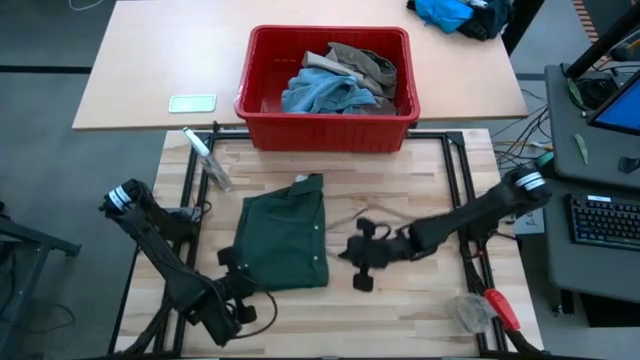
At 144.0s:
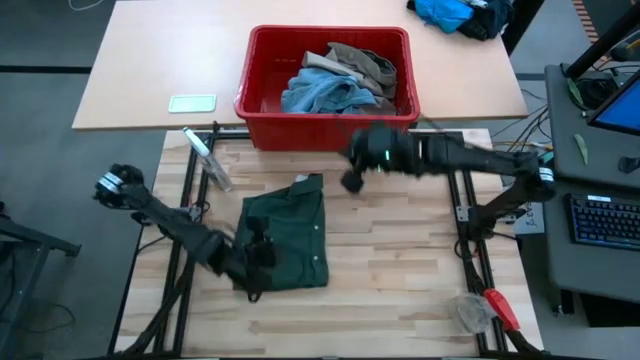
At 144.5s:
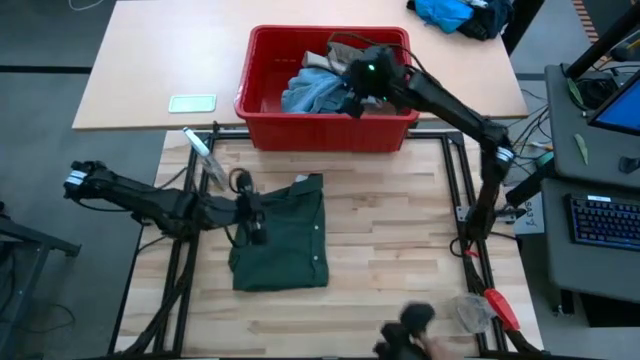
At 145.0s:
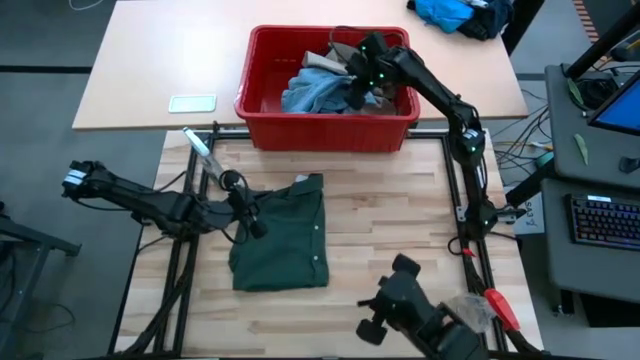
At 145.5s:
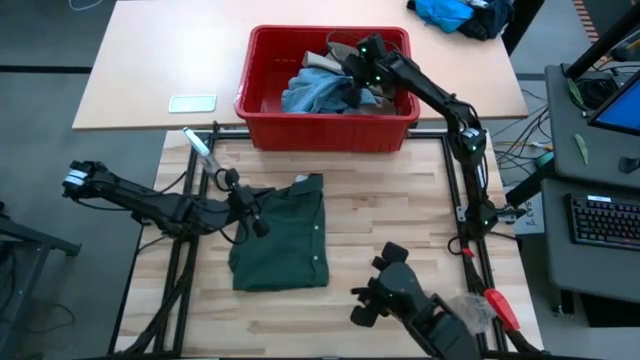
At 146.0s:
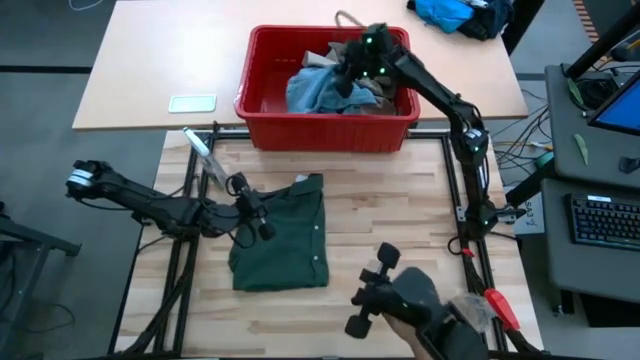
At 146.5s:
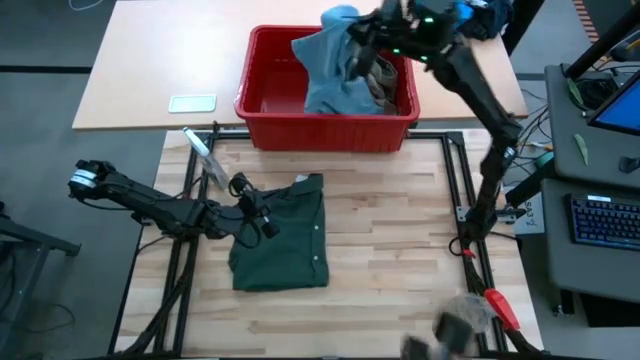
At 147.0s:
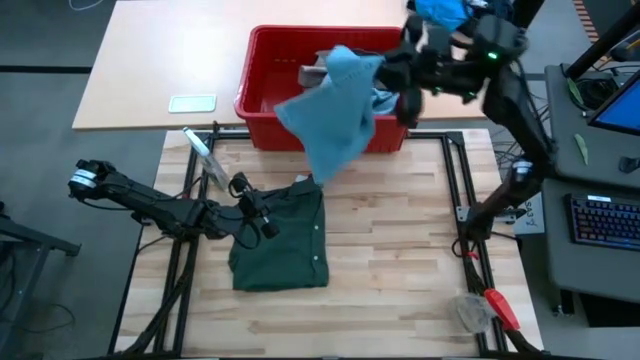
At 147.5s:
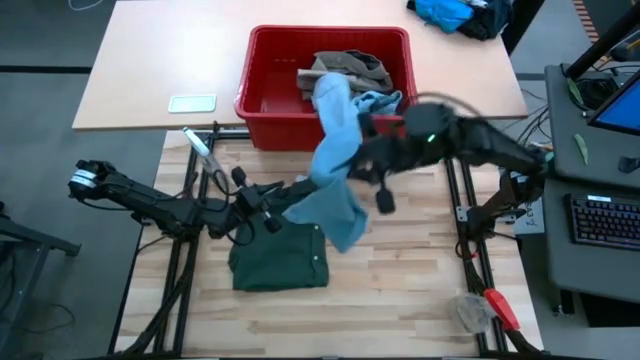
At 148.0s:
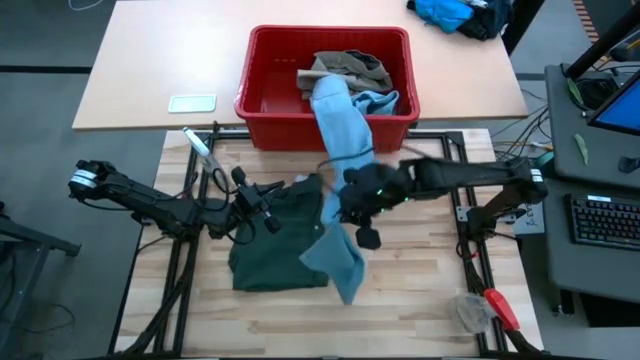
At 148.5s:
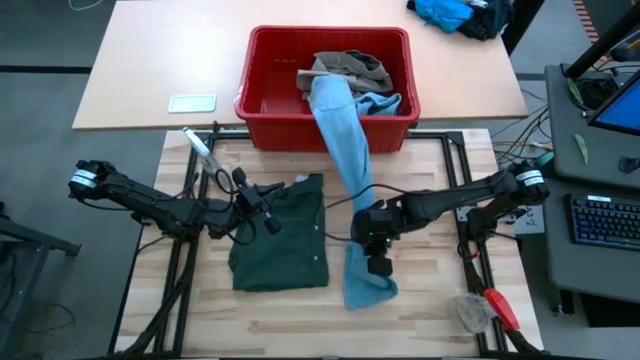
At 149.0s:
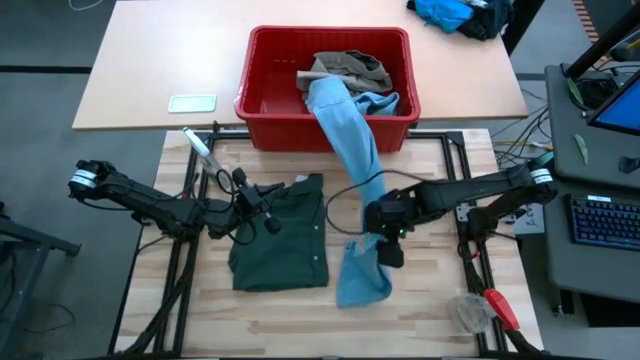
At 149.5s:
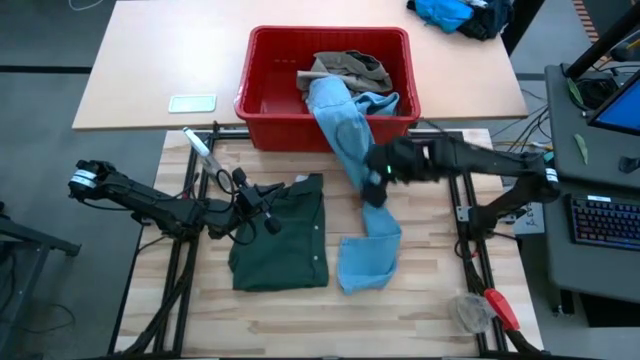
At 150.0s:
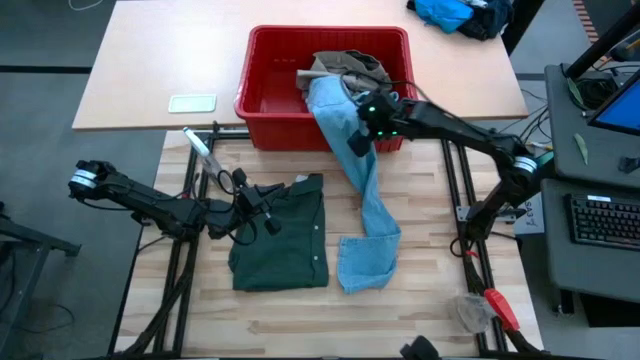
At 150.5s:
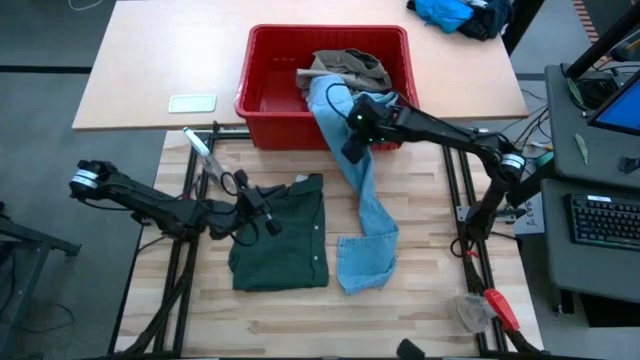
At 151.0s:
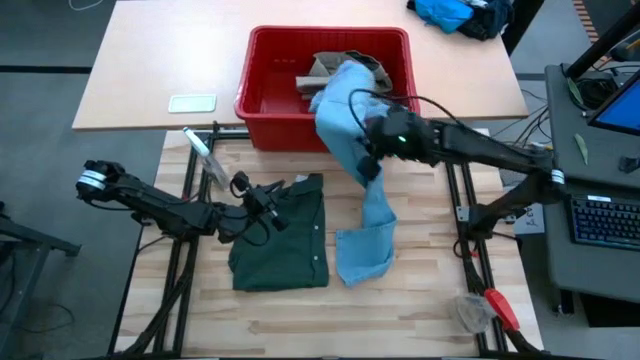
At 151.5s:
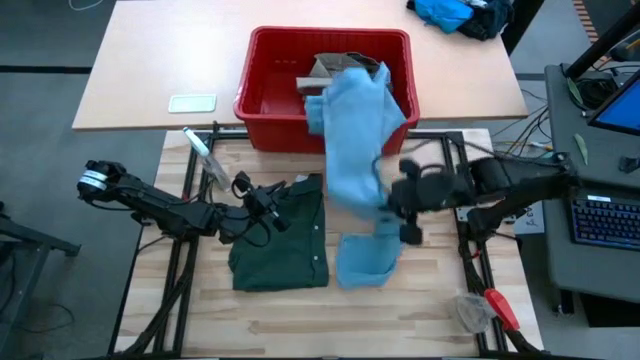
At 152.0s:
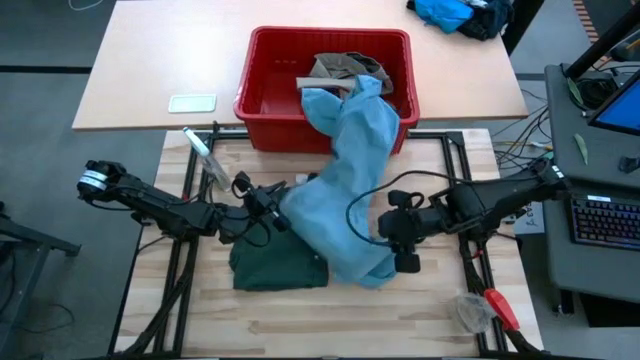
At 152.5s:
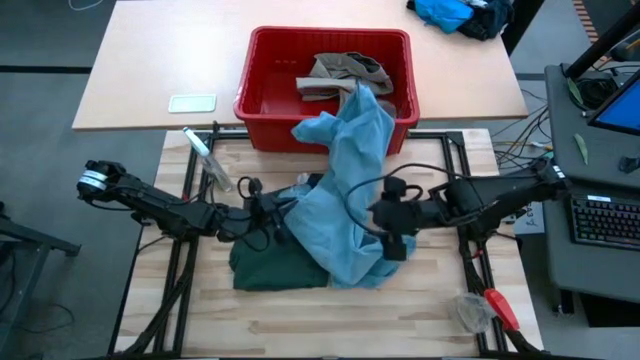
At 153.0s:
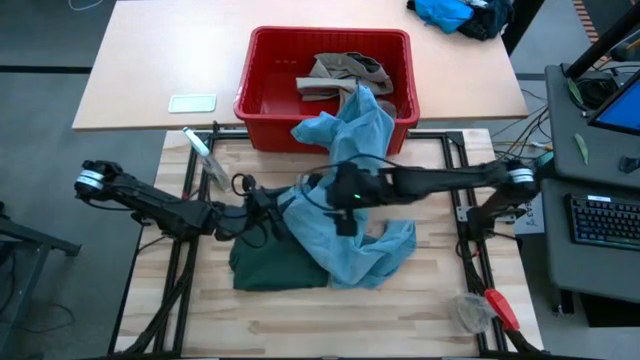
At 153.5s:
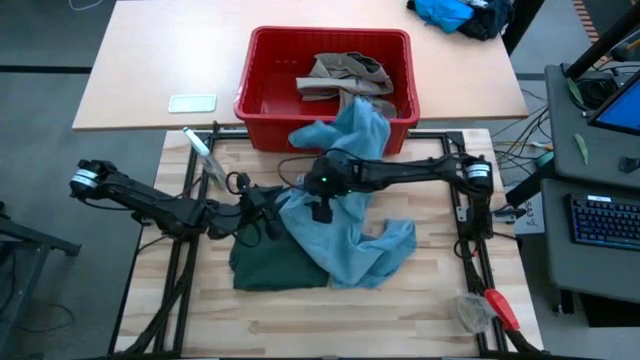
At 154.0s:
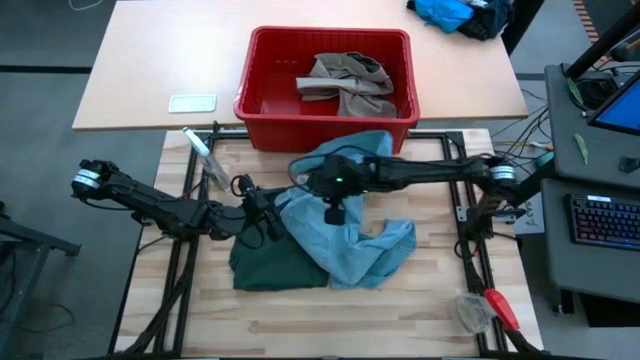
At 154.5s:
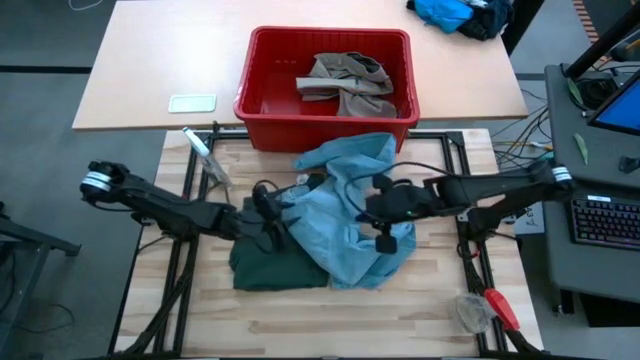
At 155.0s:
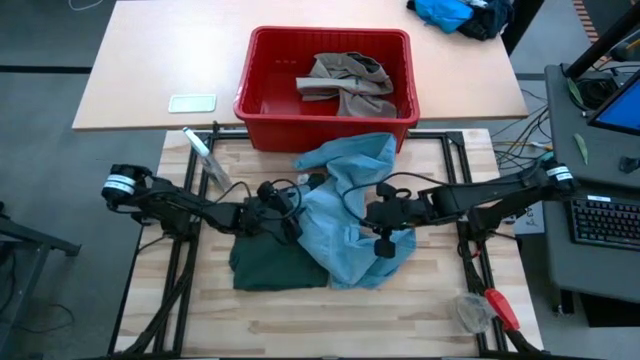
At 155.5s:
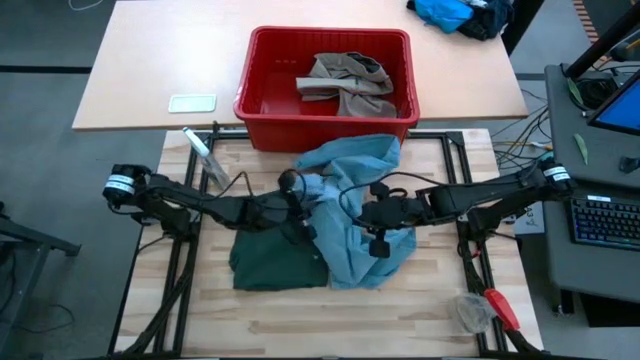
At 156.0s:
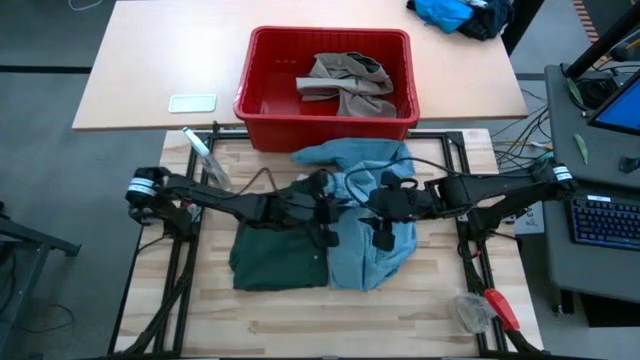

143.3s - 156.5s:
Task: Fold Laundry from Bin
Fold the blue jeans

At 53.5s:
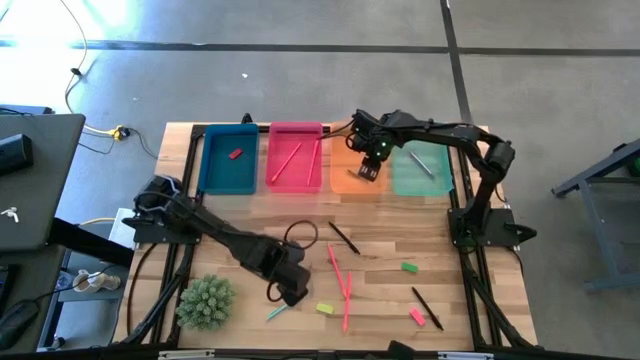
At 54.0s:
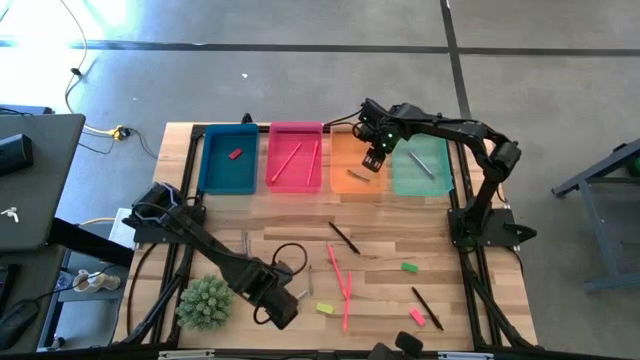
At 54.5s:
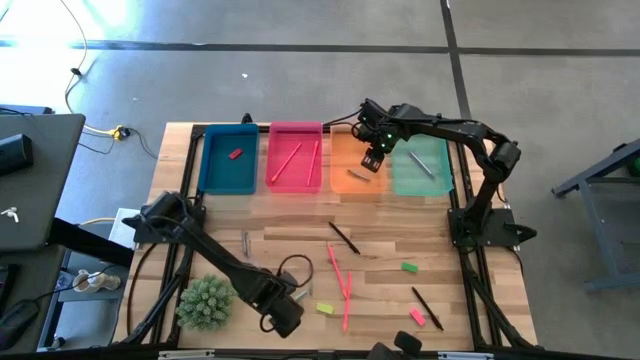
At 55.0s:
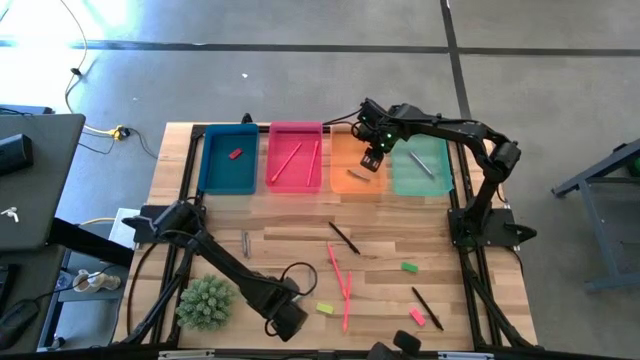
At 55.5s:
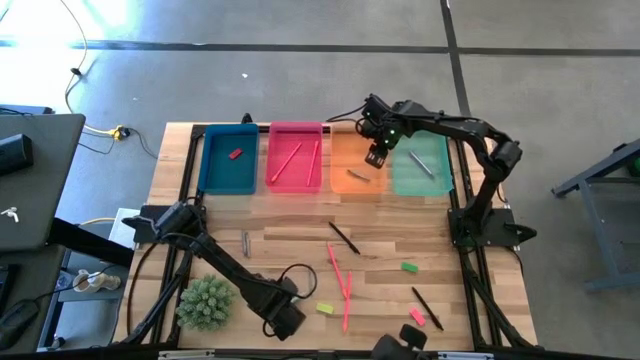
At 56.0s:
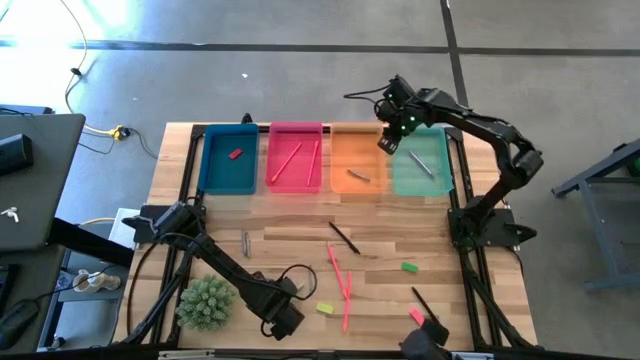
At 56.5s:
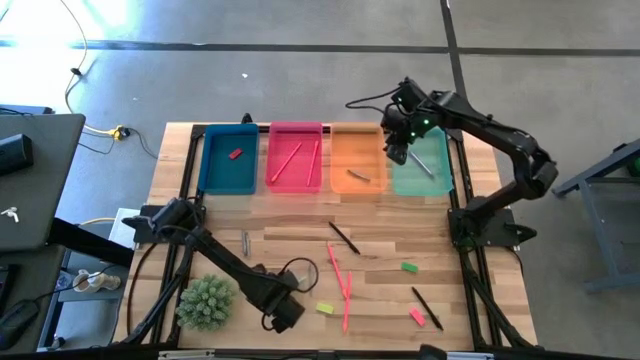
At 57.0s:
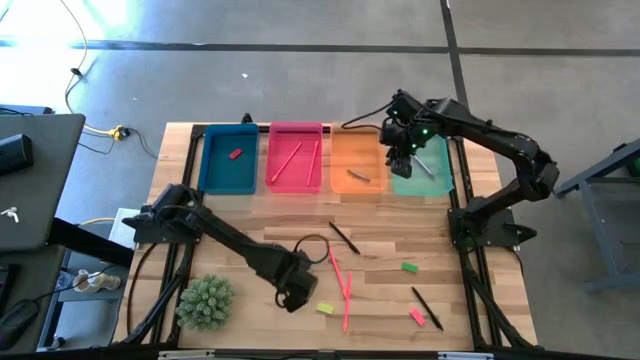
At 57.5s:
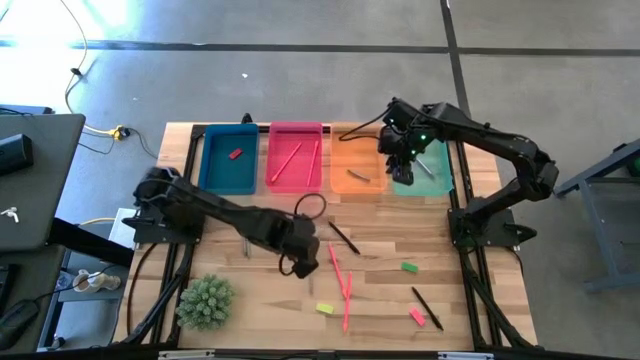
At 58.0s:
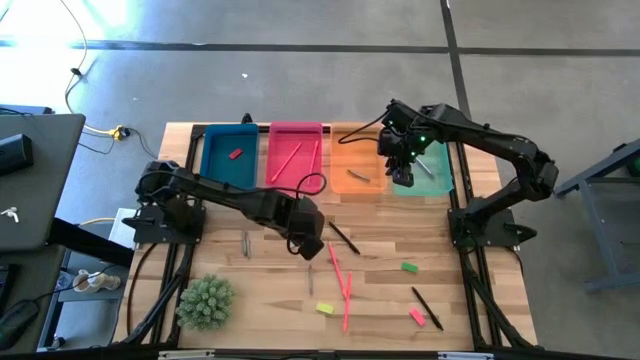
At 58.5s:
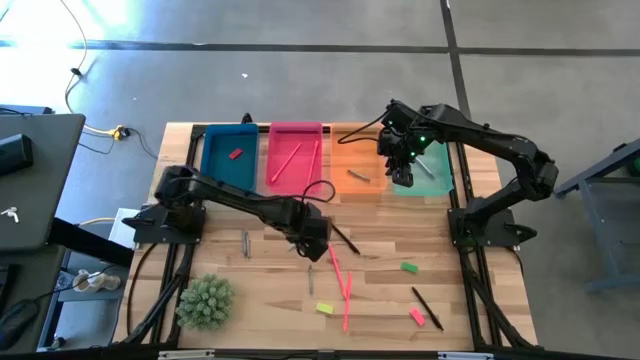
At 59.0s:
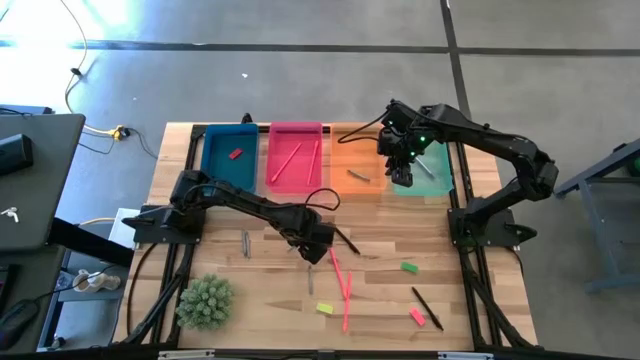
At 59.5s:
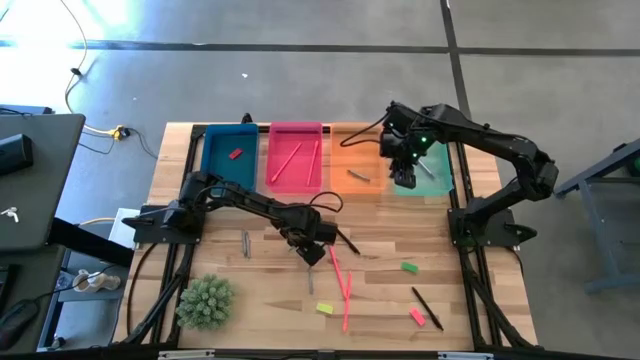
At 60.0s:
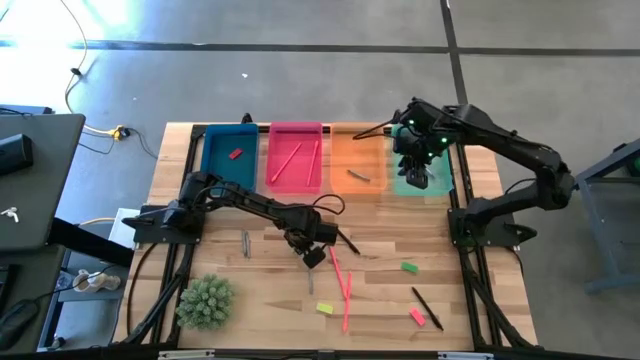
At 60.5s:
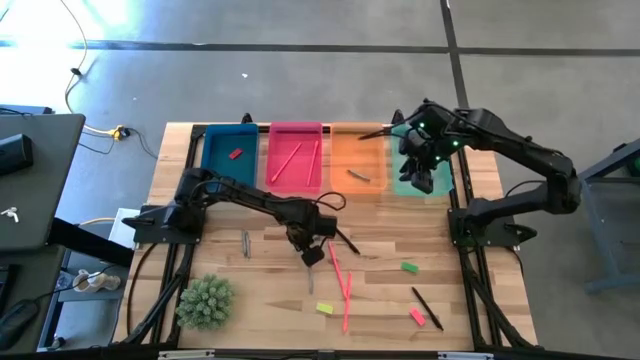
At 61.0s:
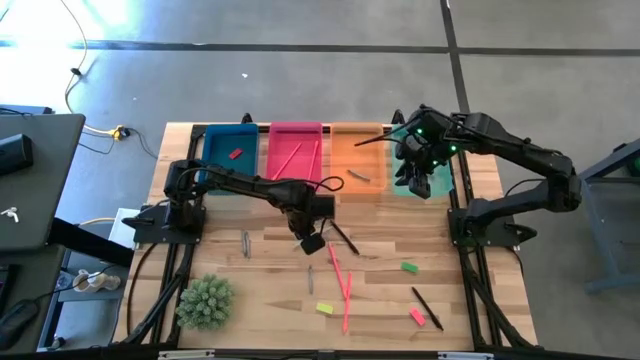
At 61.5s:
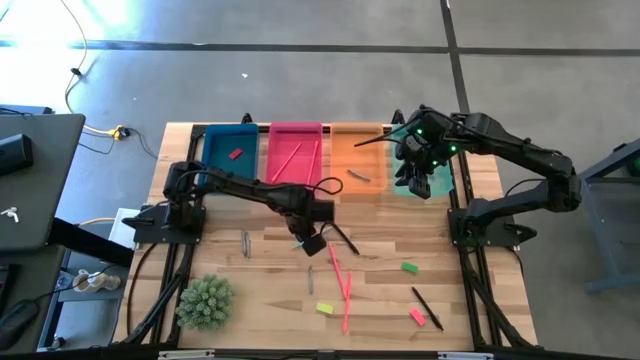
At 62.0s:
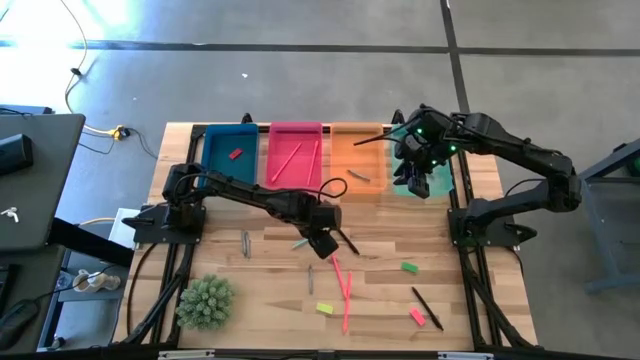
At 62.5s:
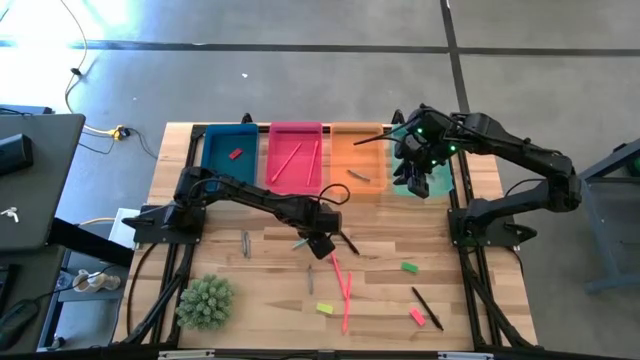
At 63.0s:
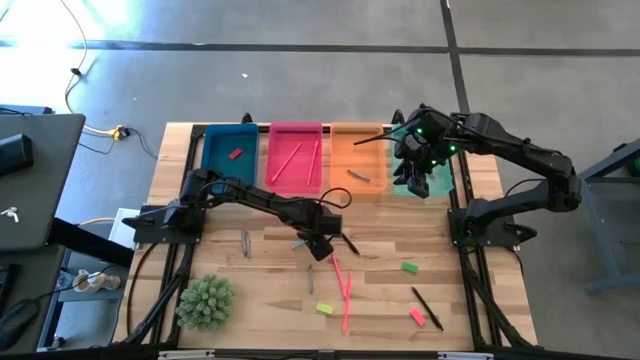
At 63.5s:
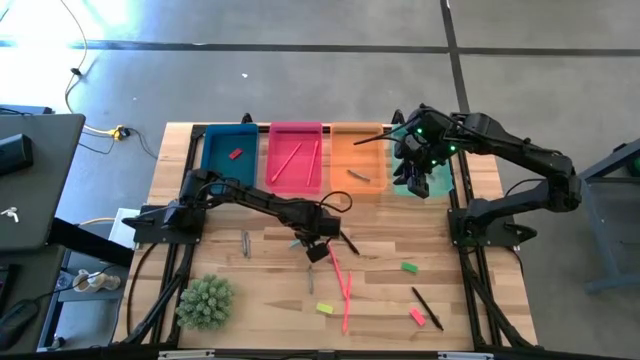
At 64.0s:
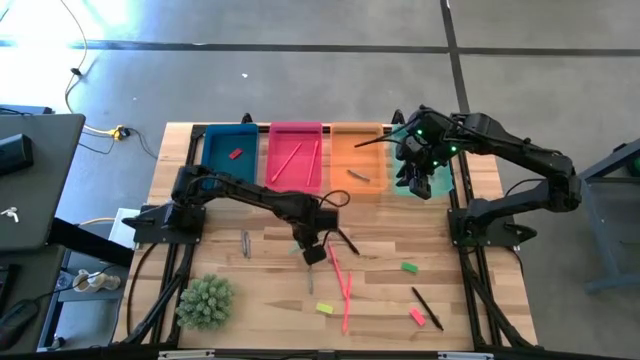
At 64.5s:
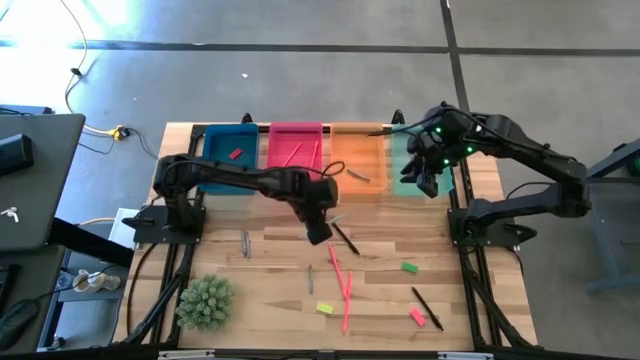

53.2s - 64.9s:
Task: Sort crayons/erasers/pens/pencils in bins
Put the blue pen into the green bin
